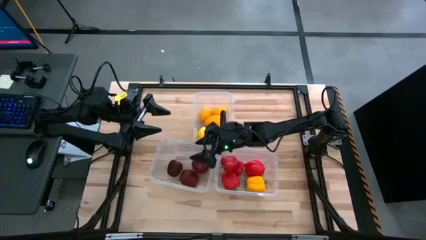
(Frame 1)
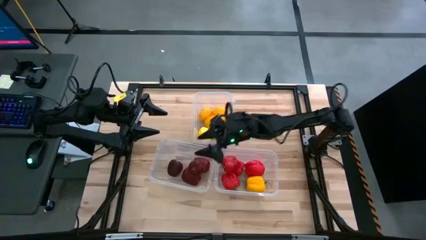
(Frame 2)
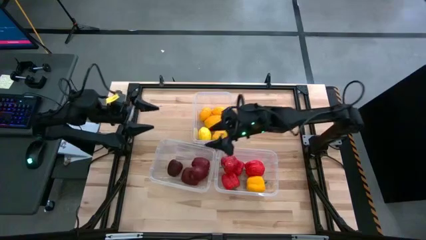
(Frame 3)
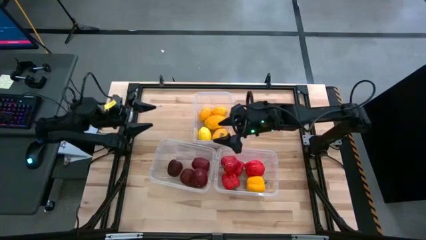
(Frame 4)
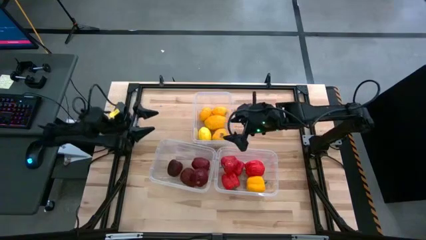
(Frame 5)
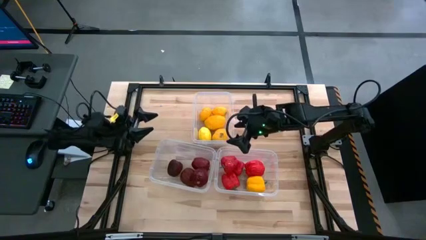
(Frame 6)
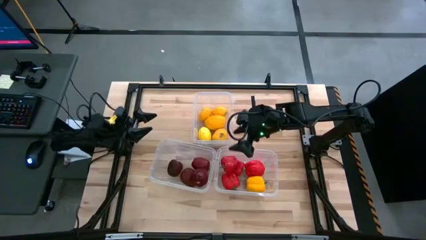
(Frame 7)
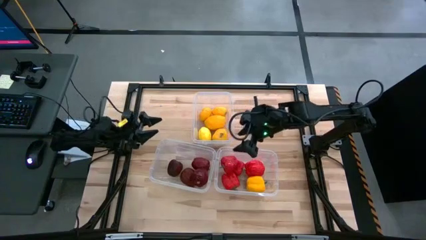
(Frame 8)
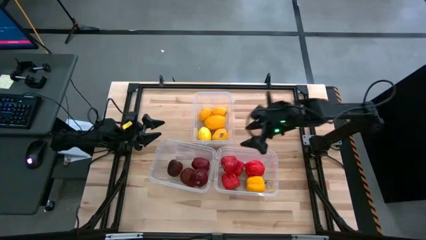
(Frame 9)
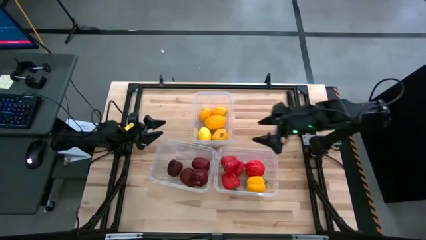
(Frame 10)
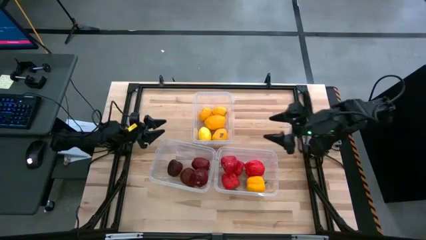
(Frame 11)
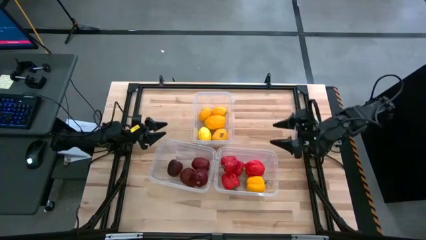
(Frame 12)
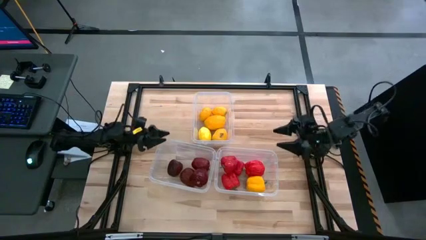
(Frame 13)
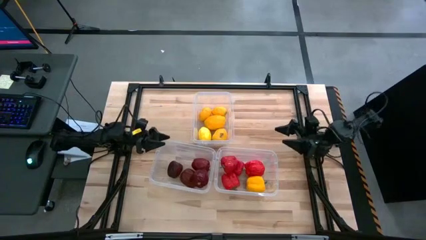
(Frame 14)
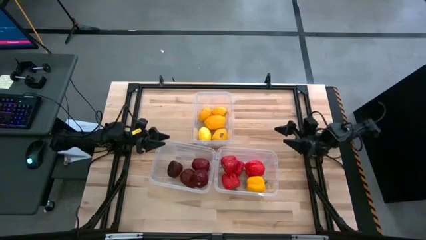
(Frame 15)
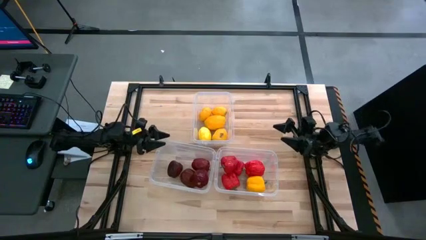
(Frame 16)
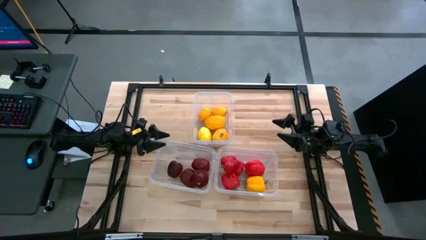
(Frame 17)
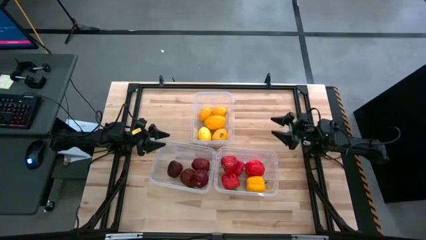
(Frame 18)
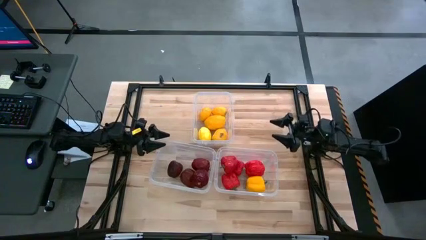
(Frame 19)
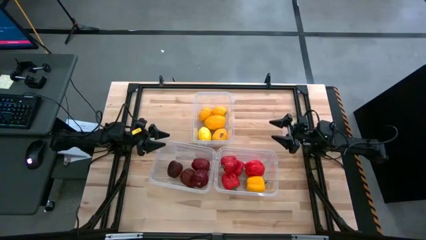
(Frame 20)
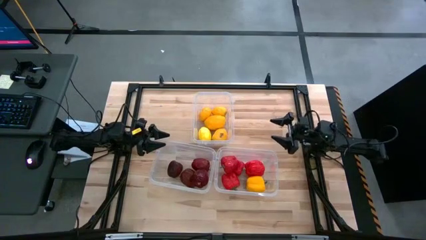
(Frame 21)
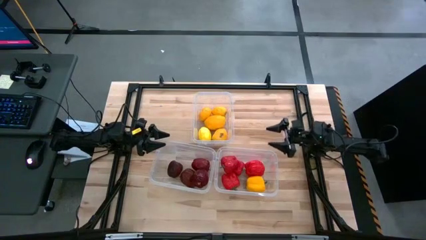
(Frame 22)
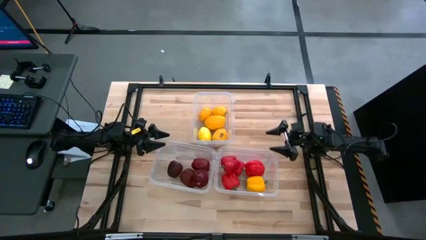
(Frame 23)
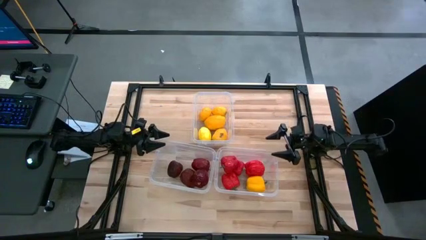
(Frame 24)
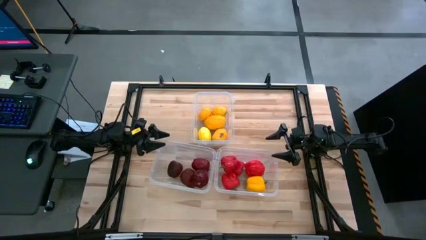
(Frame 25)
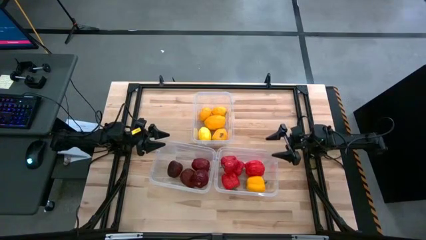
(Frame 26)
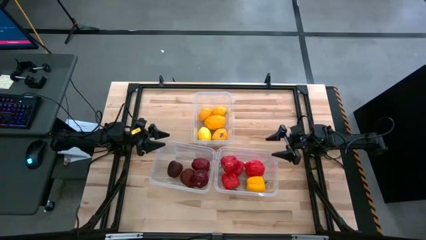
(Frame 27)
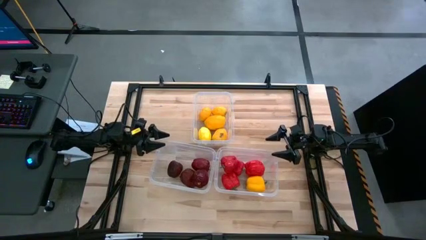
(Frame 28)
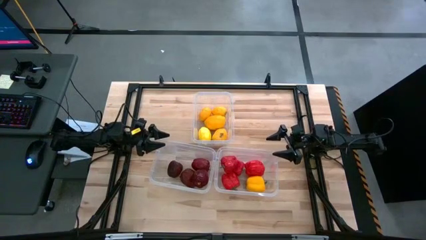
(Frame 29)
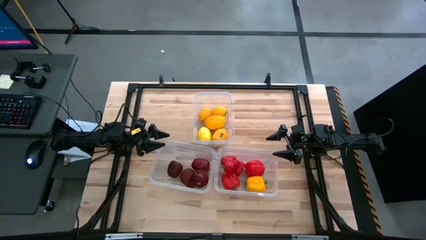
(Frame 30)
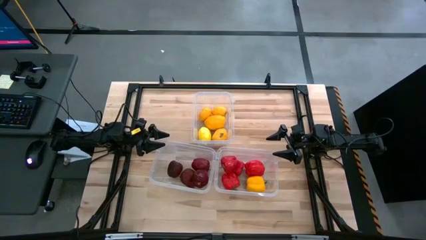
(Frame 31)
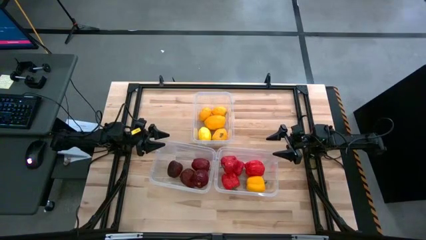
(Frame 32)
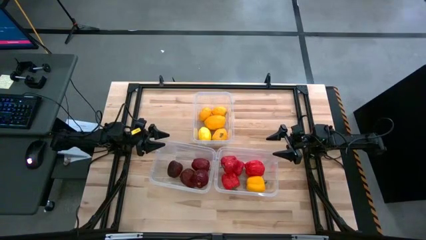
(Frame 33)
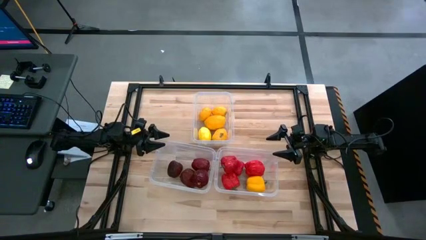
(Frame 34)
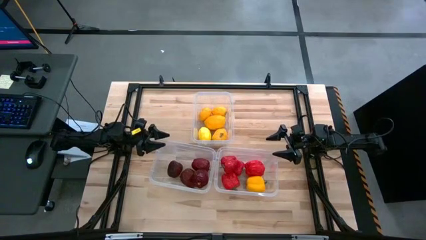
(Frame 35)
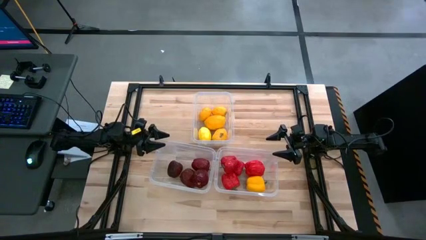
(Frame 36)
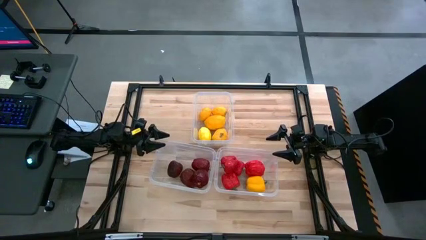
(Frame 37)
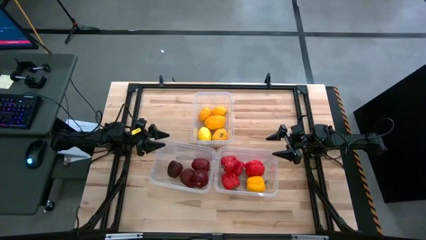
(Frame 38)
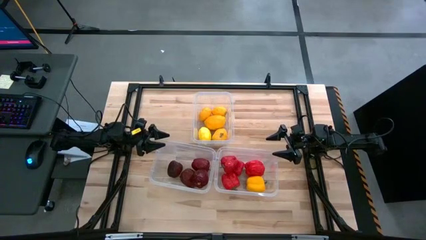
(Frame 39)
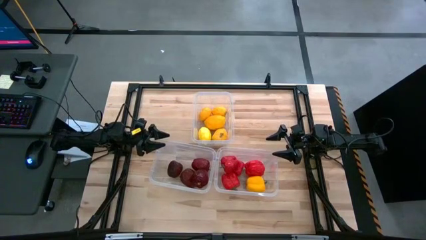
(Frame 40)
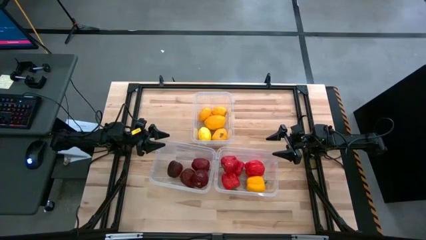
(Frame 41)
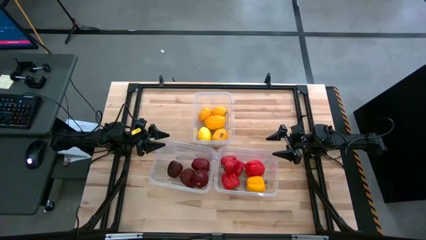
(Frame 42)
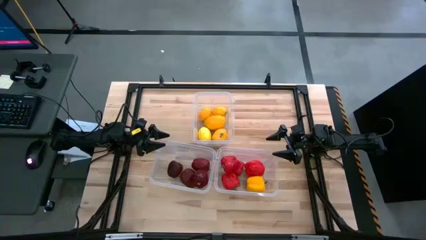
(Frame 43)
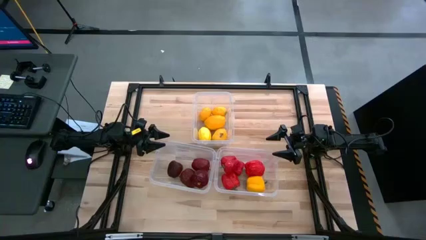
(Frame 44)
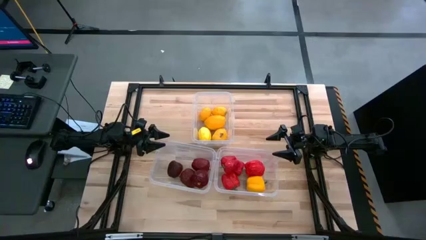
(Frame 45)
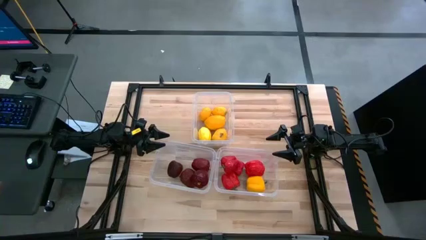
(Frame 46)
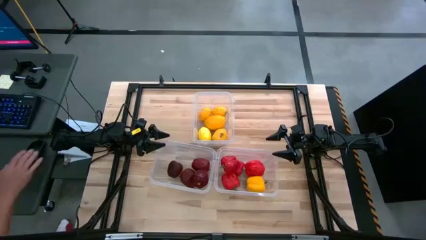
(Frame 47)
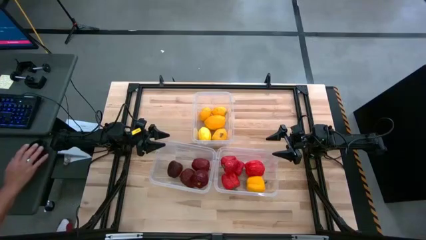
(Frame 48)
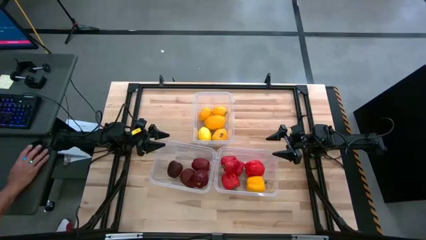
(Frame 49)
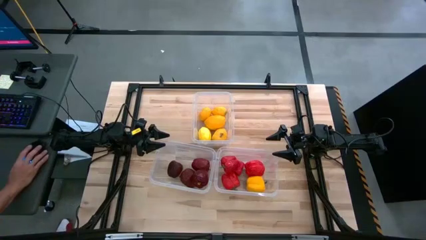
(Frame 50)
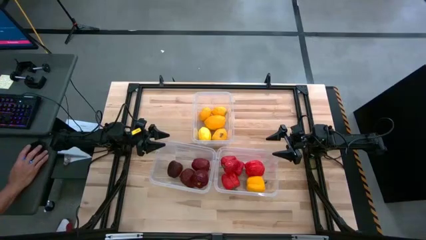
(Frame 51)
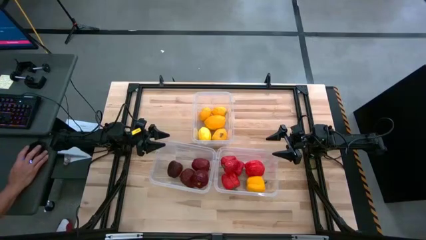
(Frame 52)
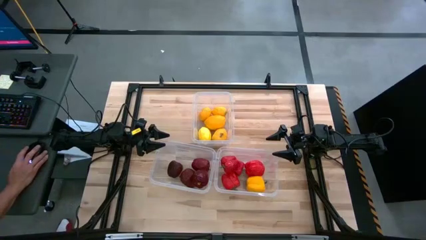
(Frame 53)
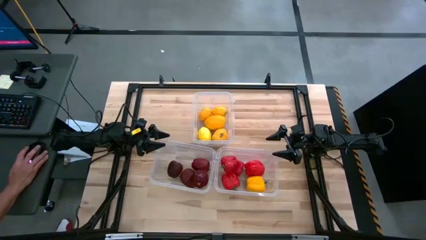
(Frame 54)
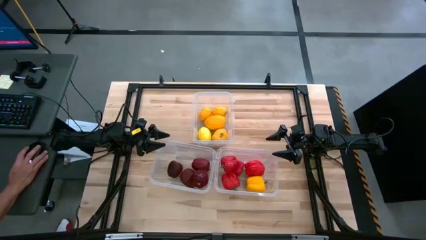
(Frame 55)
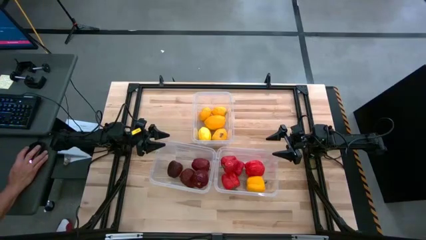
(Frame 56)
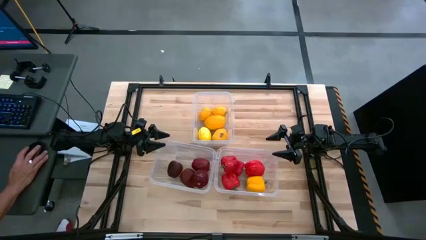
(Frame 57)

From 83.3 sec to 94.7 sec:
Task: Sort produce into baskets
Return to Home Position
